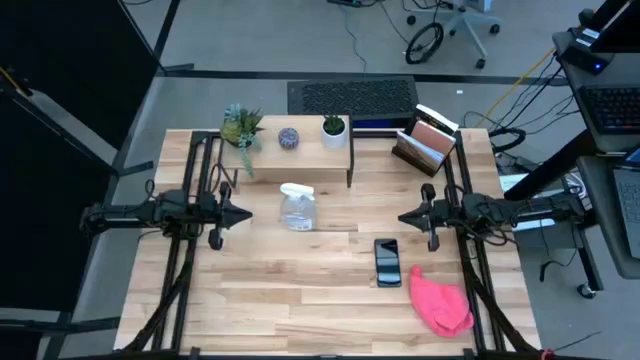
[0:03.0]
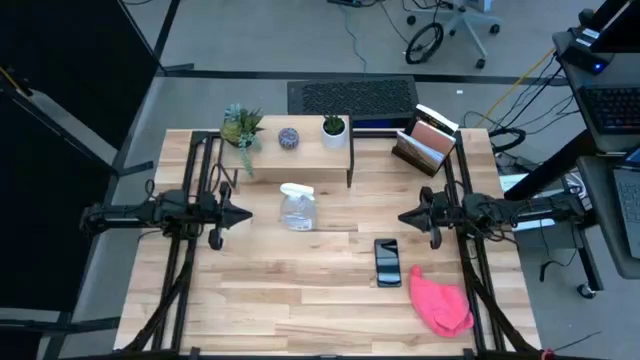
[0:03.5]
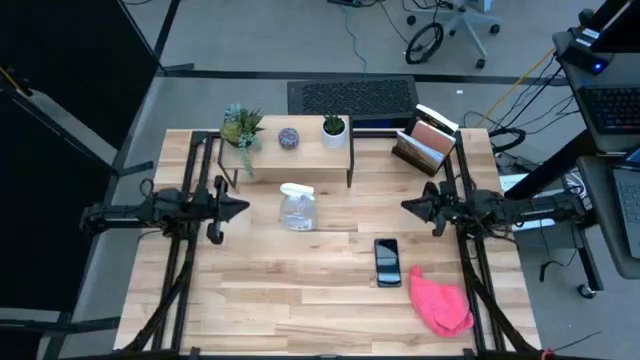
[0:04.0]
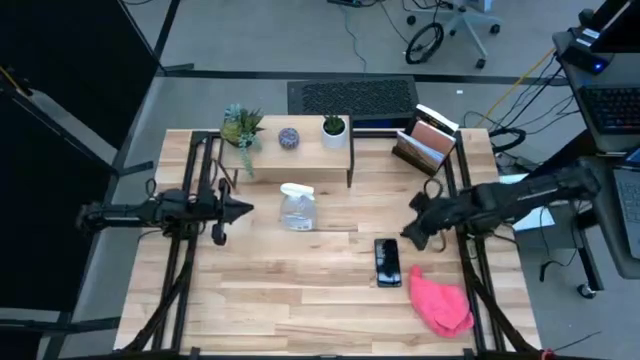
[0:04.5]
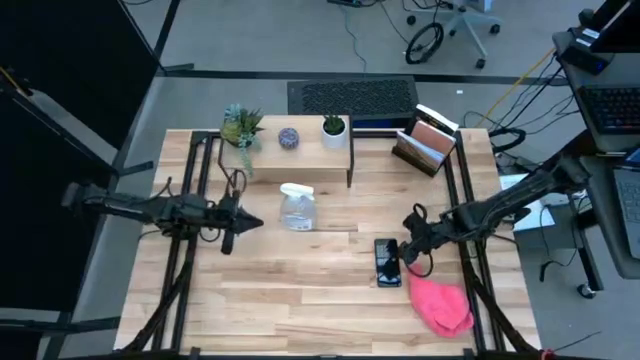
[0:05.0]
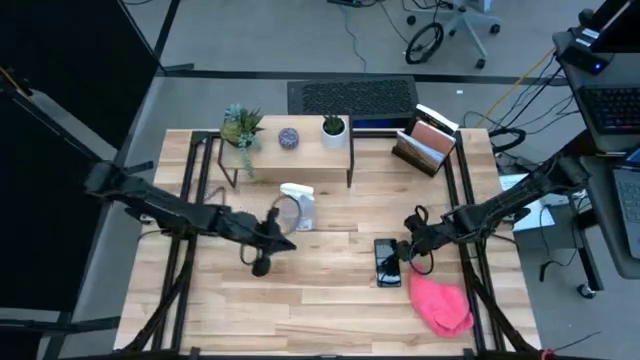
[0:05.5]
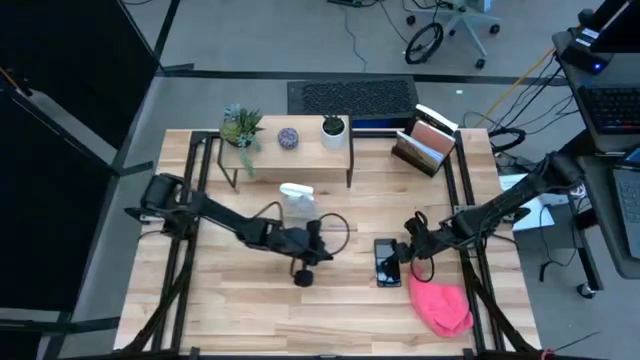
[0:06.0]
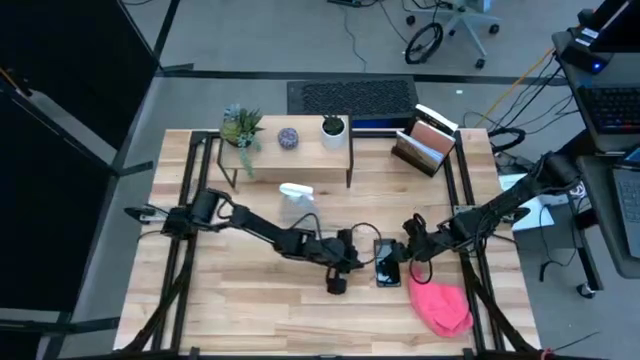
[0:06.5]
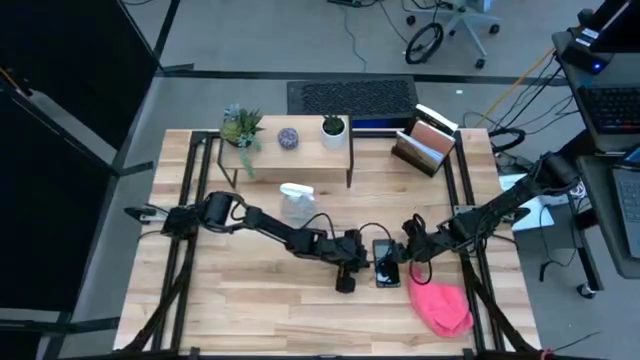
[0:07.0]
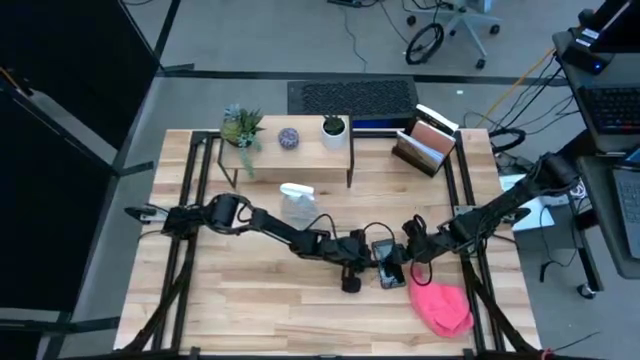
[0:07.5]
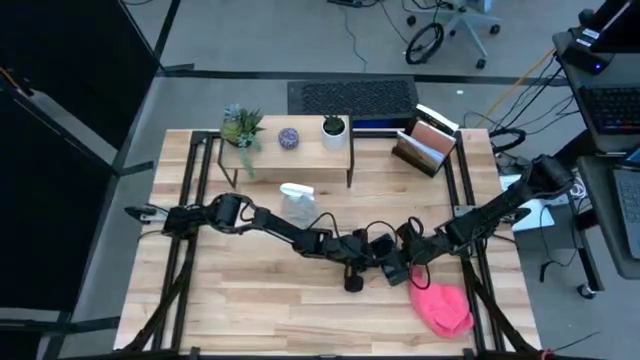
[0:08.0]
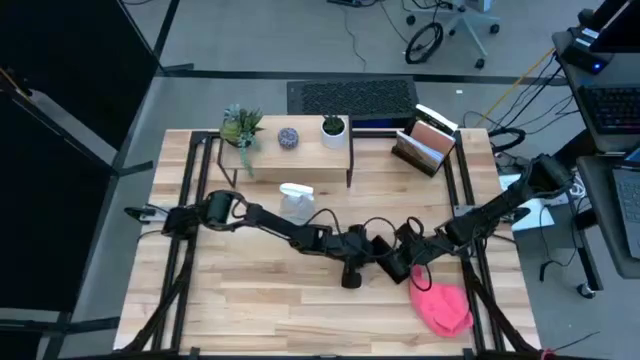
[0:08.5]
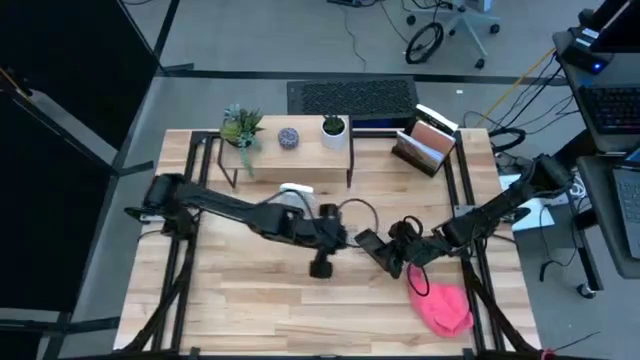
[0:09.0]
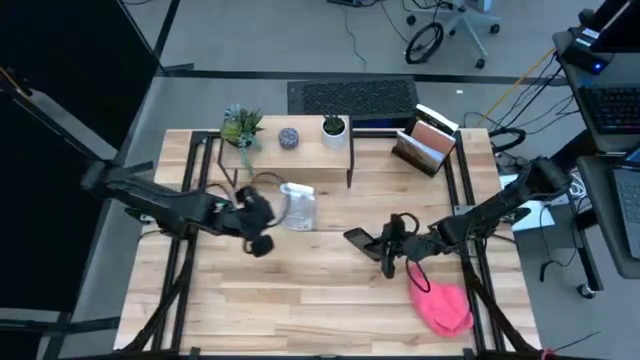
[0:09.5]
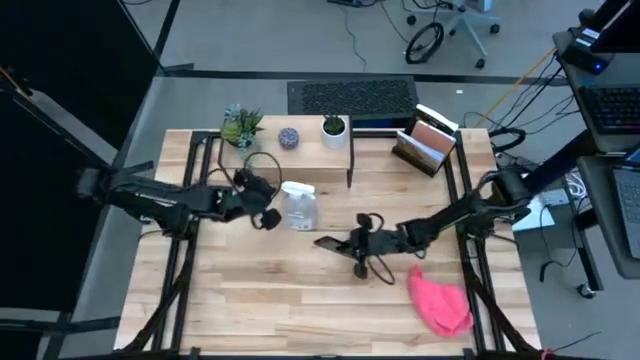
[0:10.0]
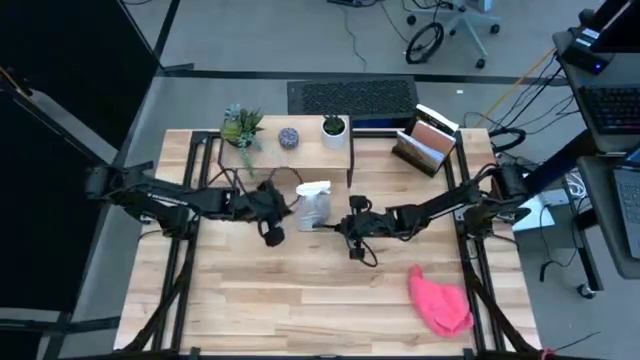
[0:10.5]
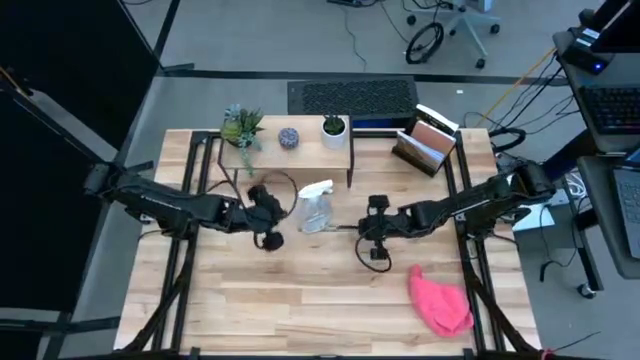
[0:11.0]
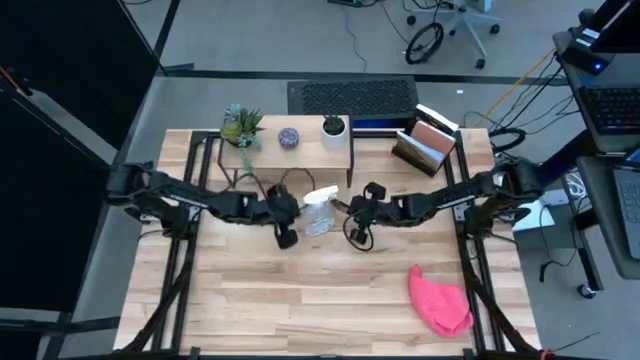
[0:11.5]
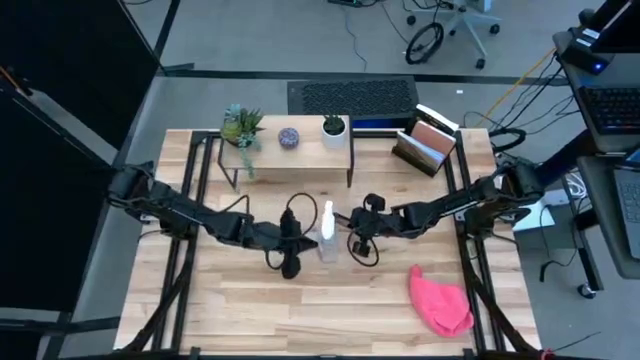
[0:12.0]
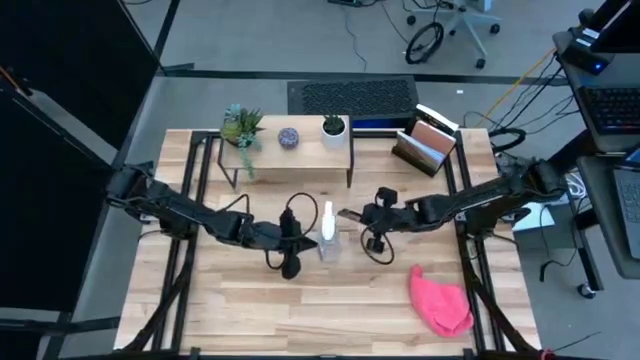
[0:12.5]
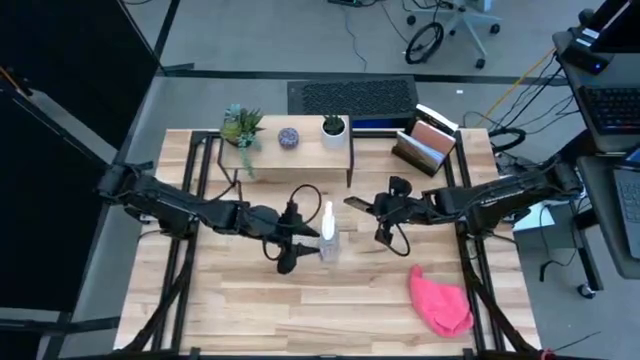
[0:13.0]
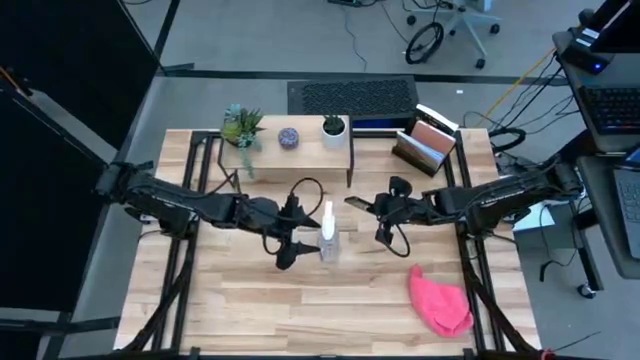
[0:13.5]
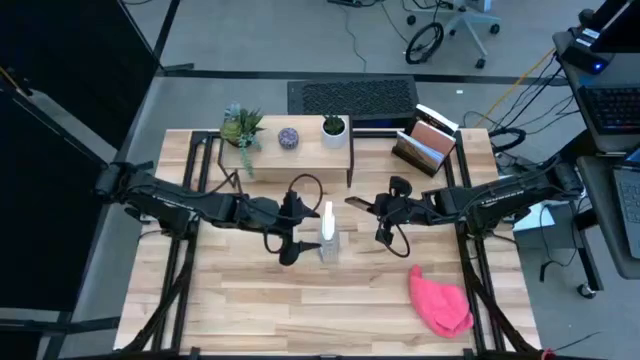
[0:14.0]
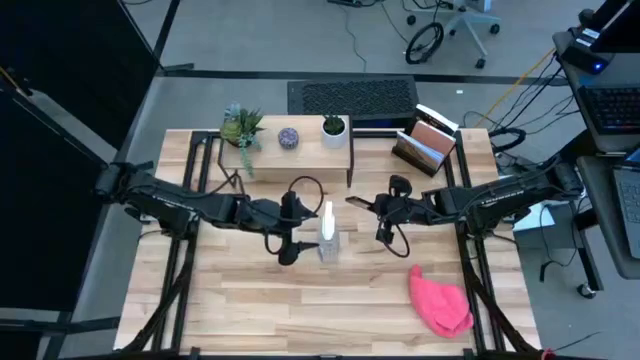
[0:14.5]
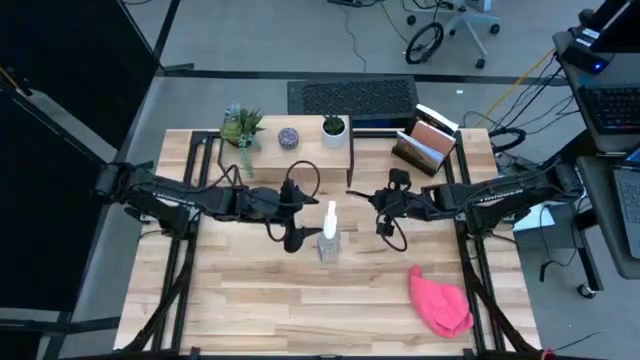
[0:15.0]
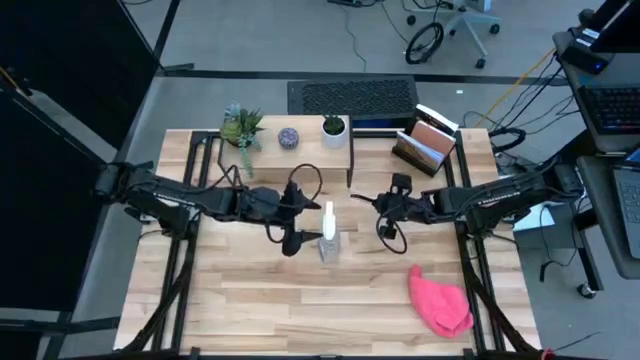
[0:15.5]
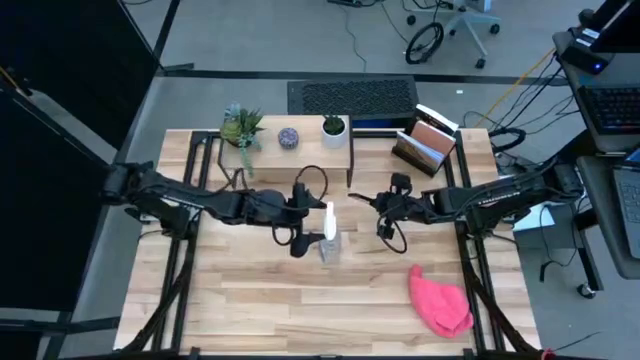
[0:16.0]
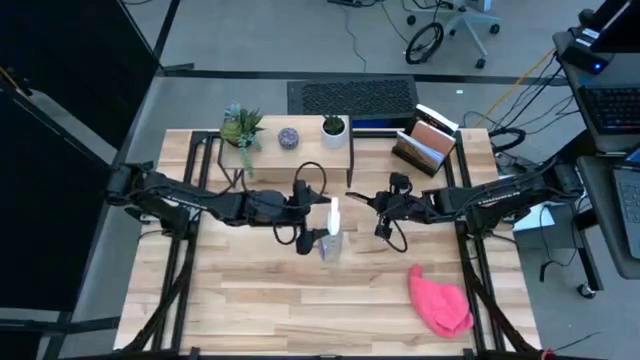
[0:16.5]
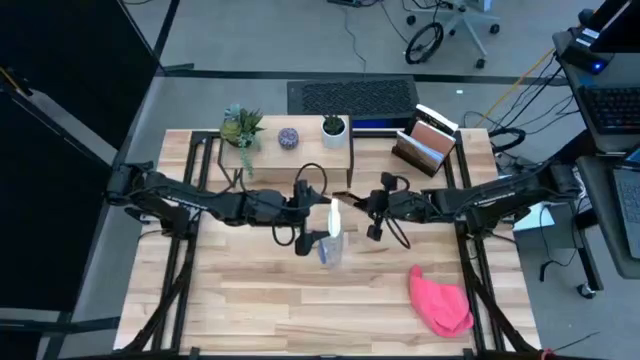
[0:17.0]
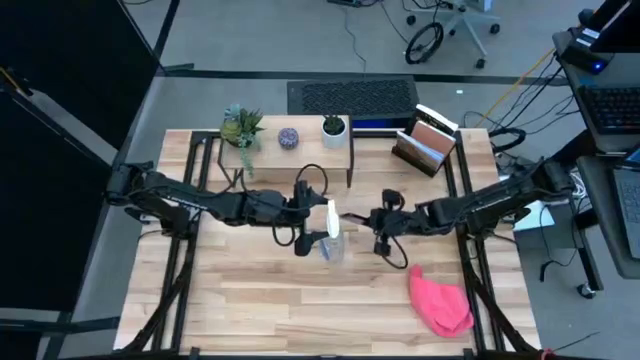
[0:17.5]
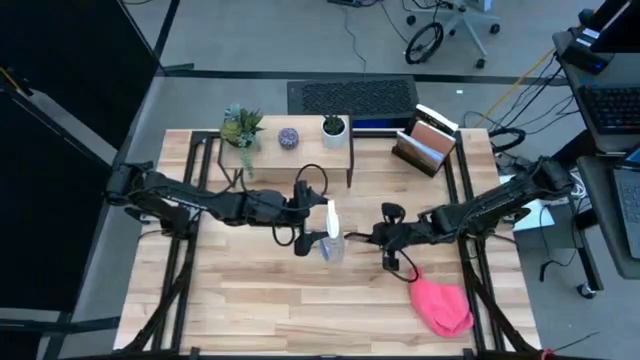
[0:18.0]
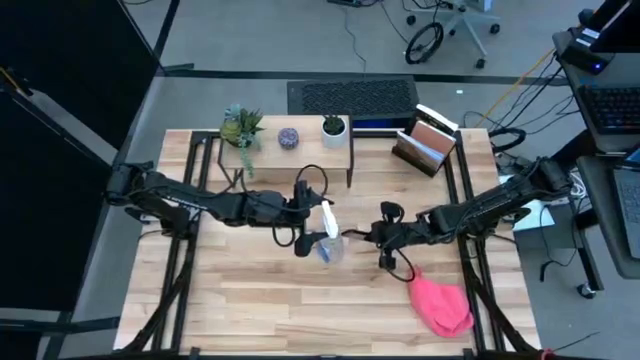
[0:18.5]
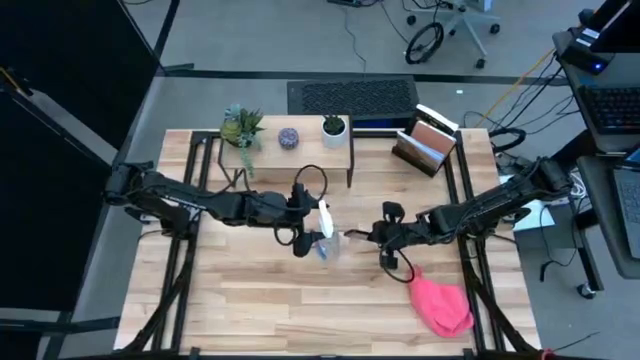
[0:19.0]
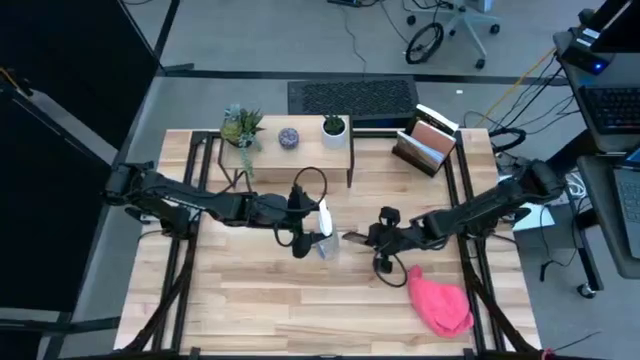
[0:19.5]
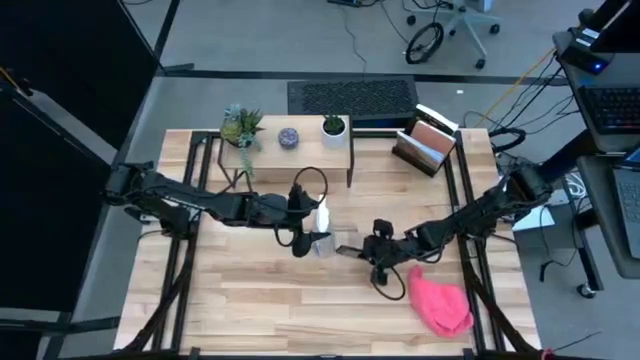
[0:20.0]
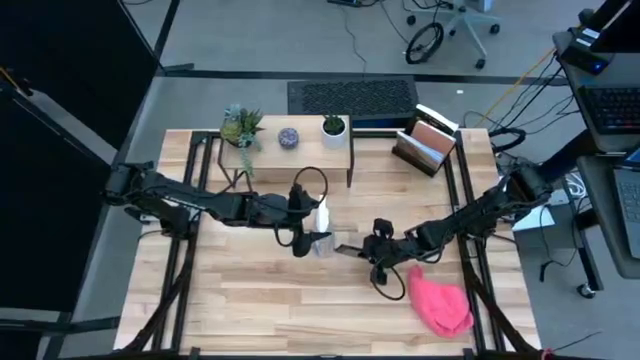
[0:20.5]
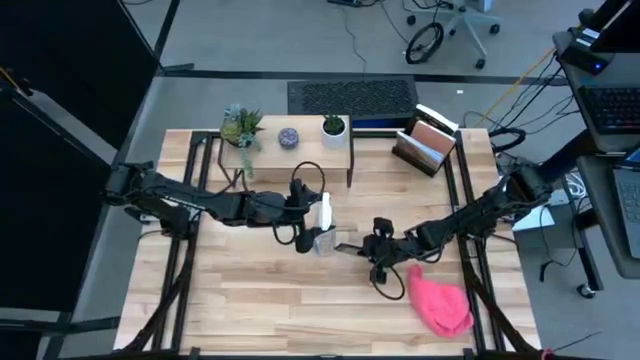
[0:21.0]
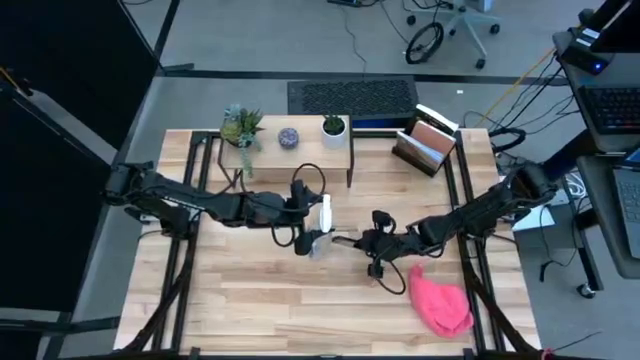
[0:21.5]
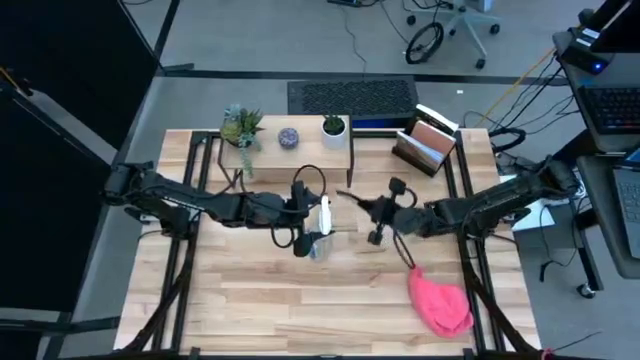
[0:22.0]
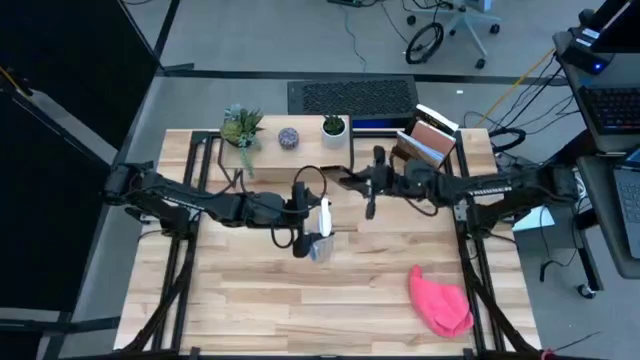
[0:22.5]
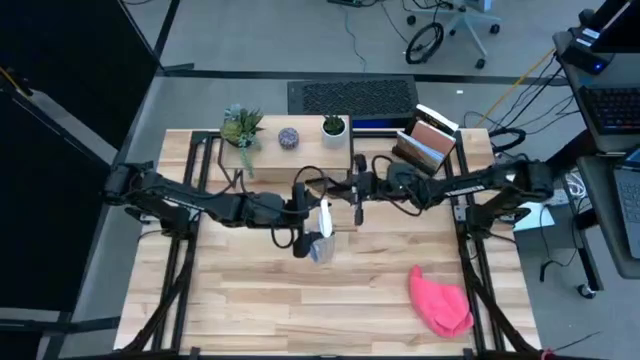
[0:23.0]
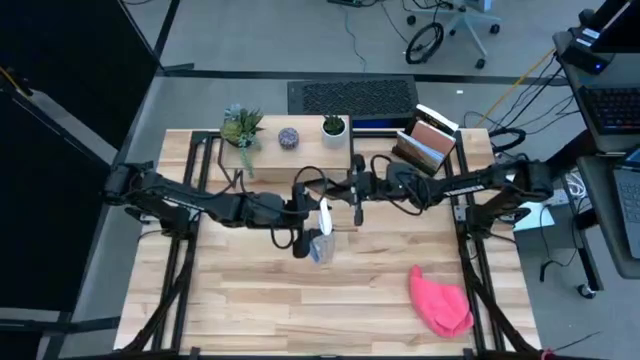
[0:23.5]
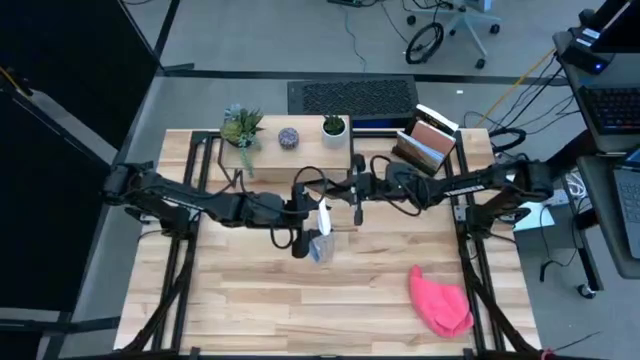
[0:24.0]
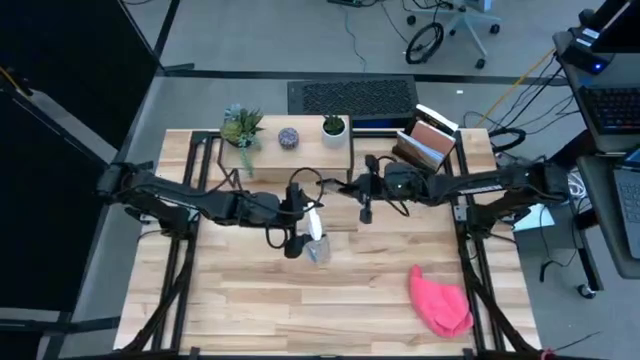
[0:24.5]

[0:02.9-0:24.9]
Task: Apply microfiber cloth
Spray the black cellphone with the transparent cleaning spray bottle
